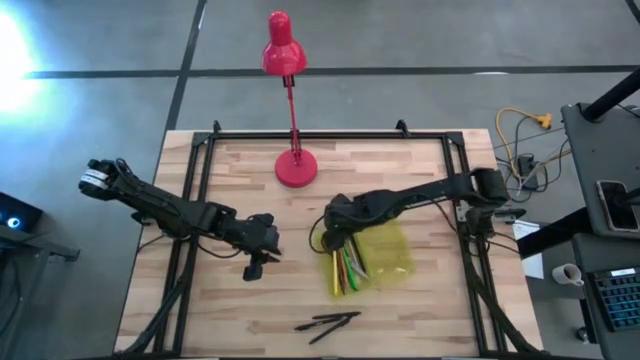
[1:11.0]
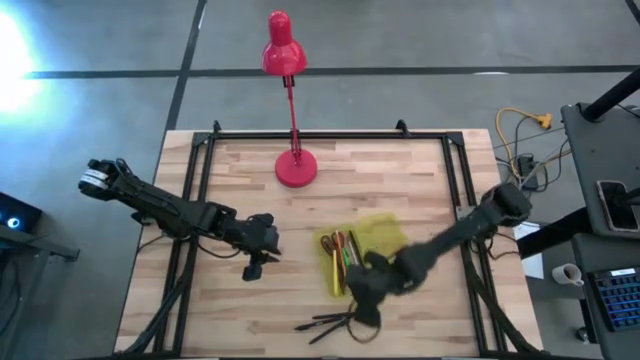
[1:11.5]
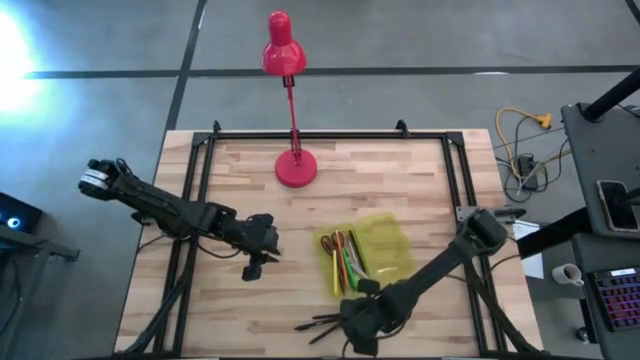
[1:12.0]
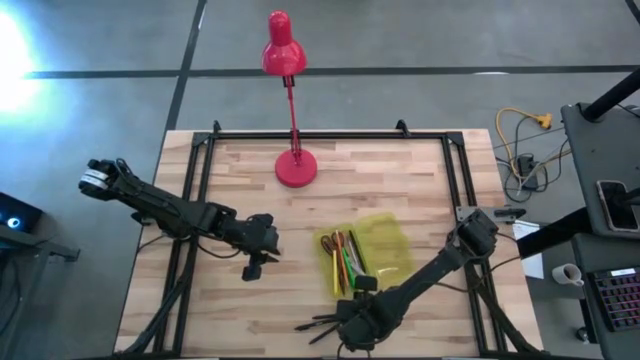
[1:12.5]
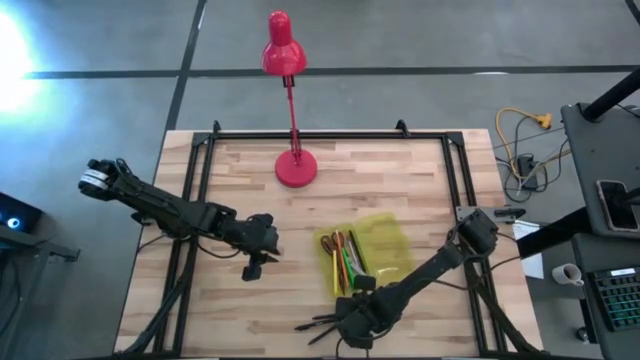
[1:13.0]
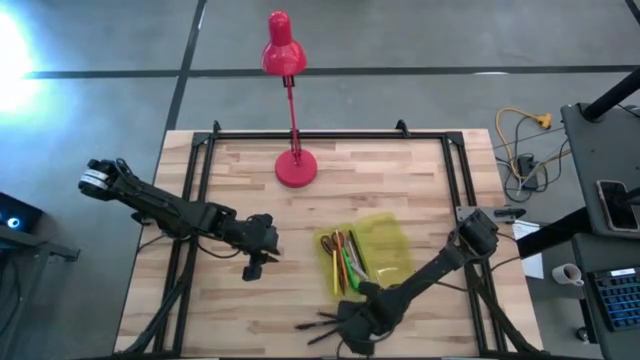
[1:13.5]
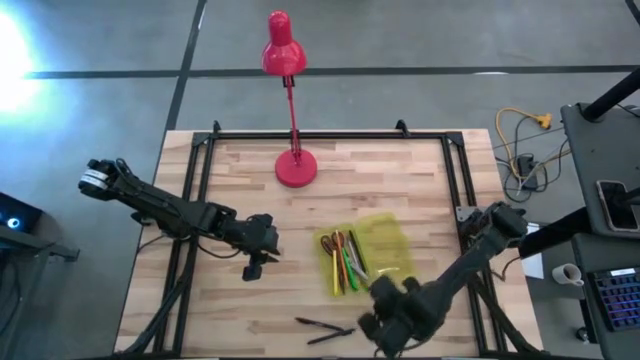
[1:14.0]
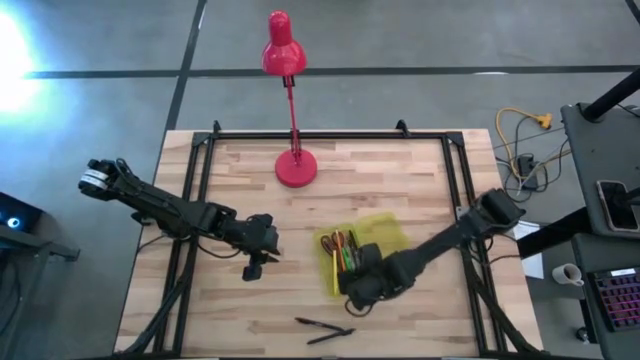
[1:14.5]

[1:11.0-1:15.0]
Task: Pick & place school supplies into a supply box
Put the black pen into the yellow supply box

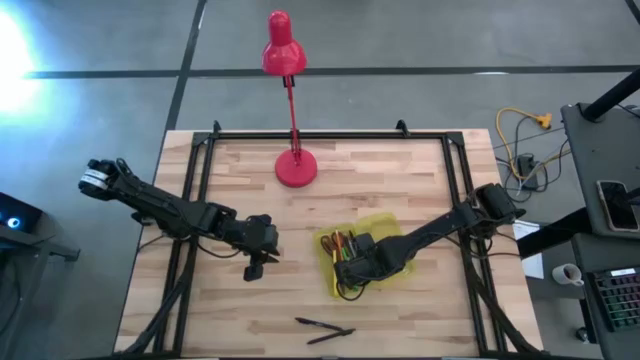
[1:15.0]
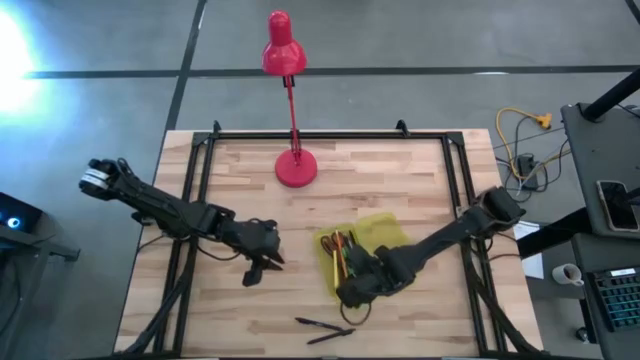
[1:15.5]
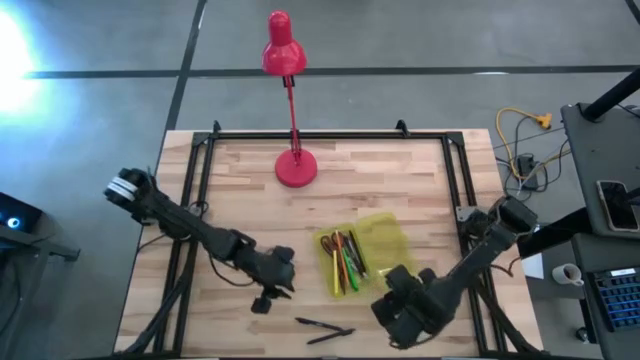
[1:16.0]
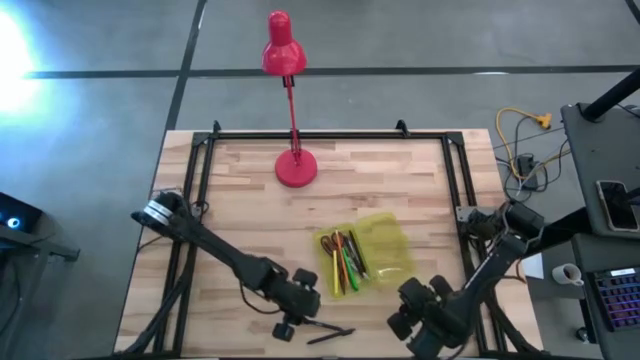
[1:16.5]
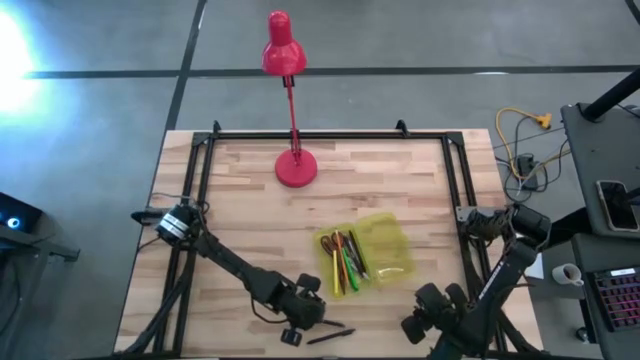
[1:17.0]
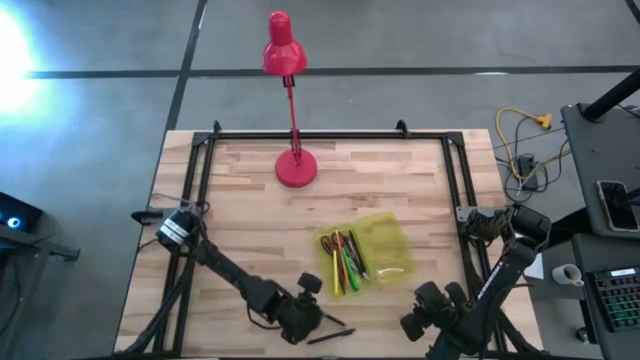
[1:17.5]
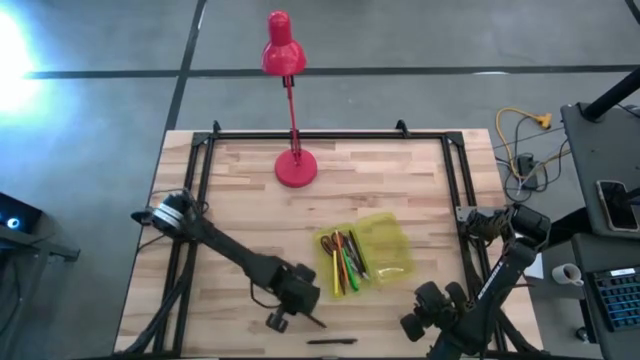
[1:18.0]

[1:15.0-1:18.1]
Put the black pen into the yellow supply box

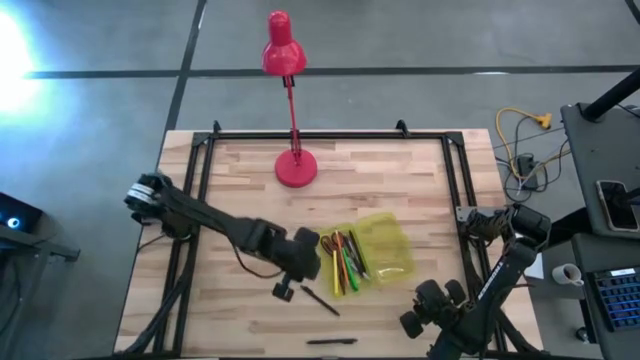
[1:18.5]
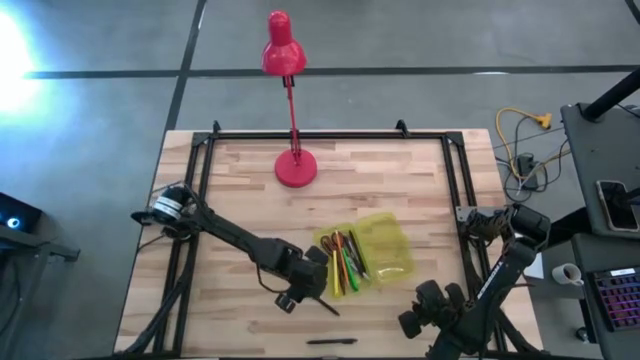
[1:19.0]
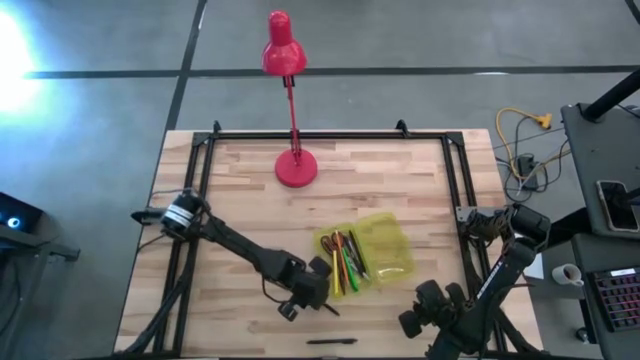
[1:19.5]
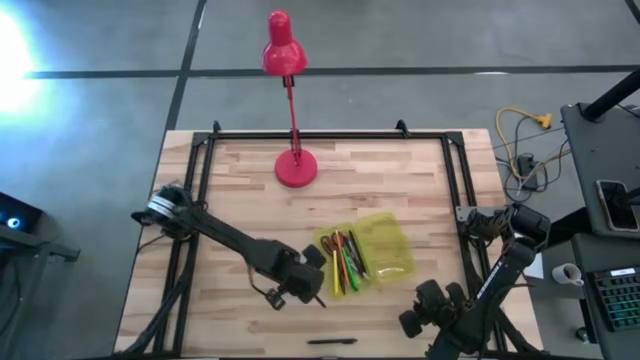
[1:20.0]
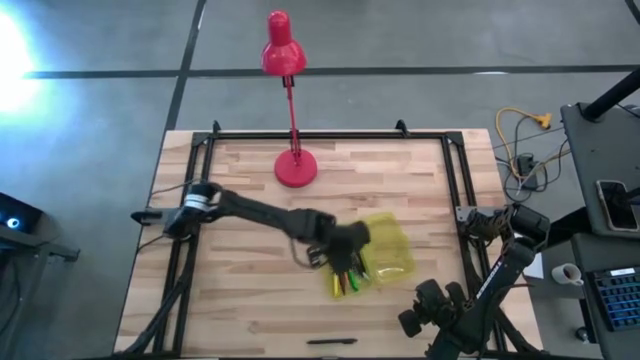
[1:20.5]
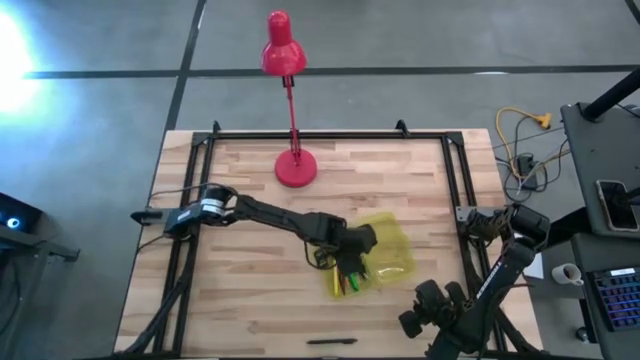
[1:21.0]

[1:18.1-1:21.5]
Put the black pen into the yellow supply box

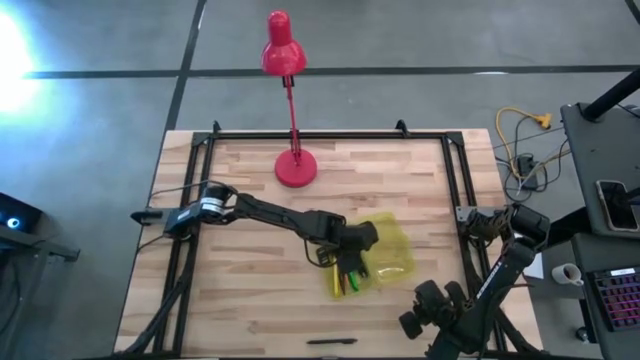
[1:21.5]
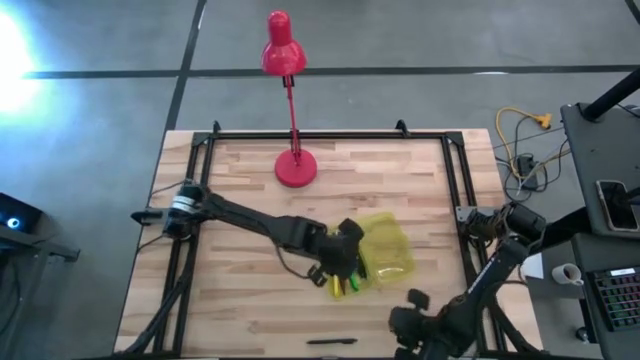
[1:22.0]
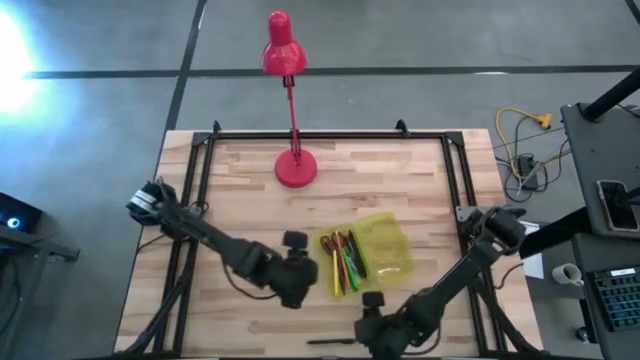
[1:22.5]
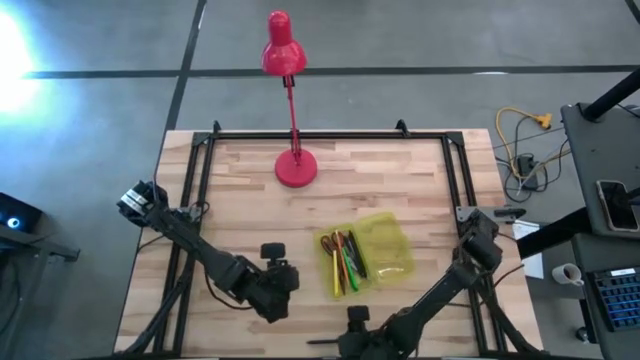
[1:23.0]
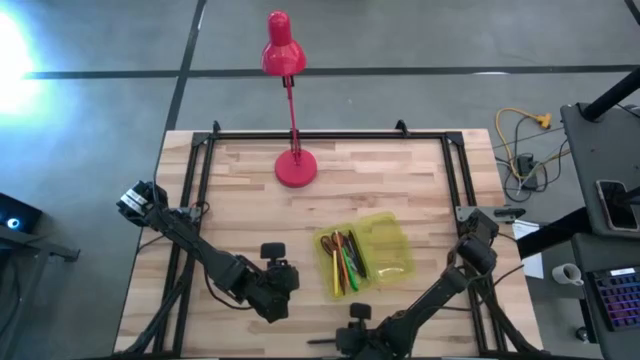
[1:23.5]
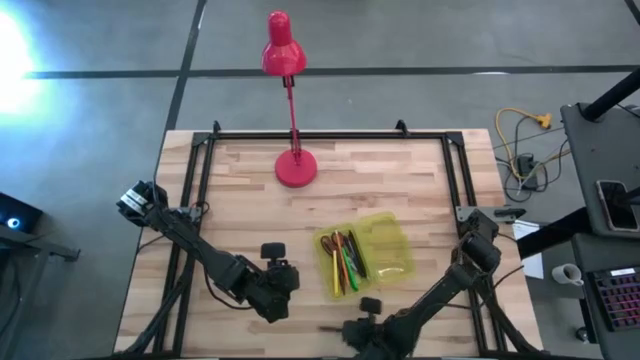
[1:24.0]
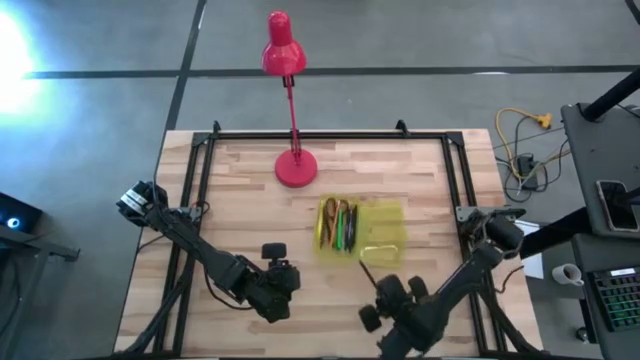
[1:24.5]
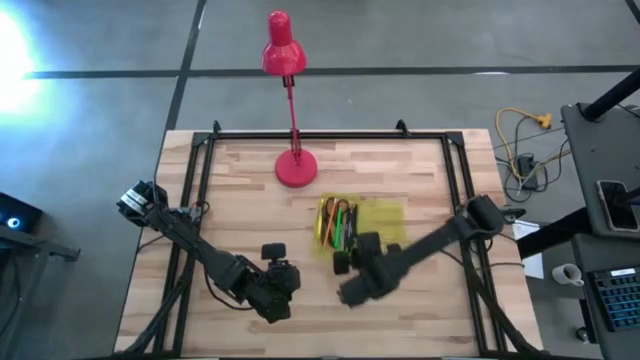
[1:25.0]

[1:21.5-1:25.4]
Put the black pen into the yellow supply box

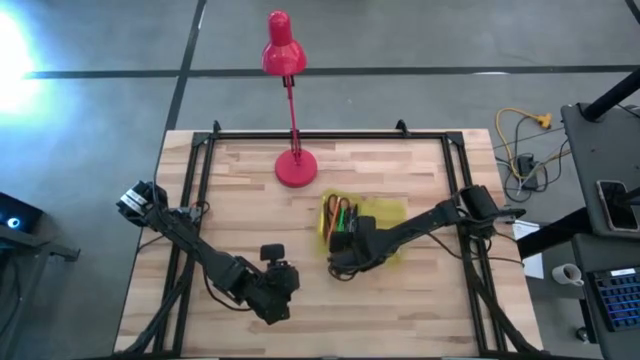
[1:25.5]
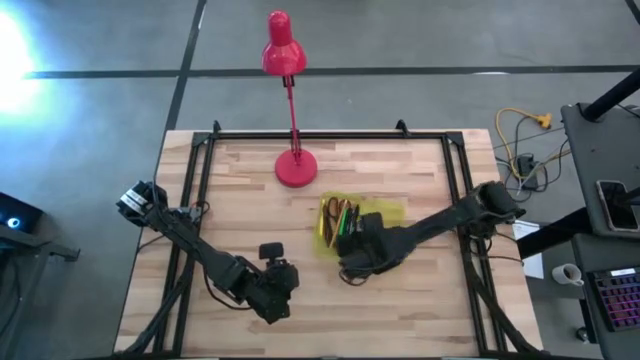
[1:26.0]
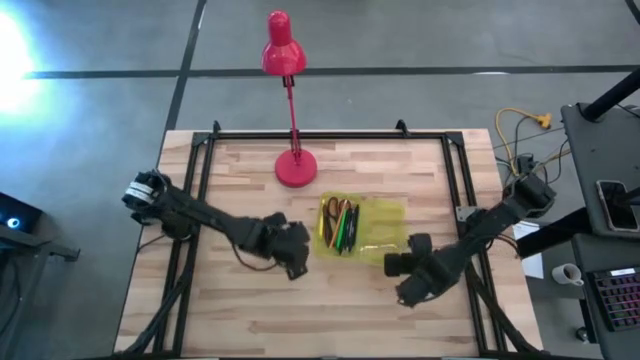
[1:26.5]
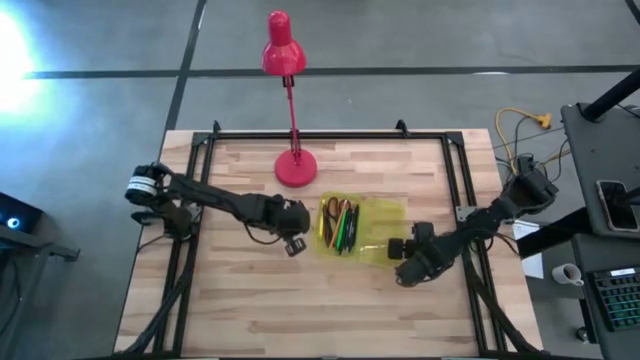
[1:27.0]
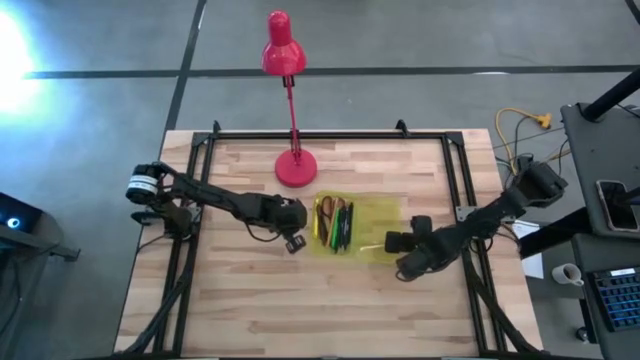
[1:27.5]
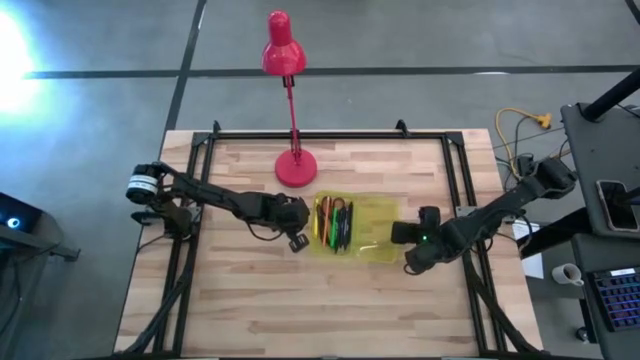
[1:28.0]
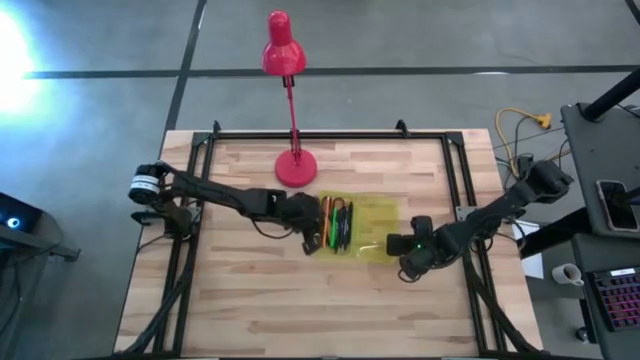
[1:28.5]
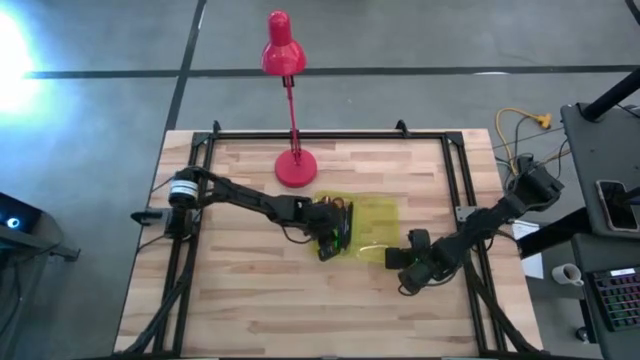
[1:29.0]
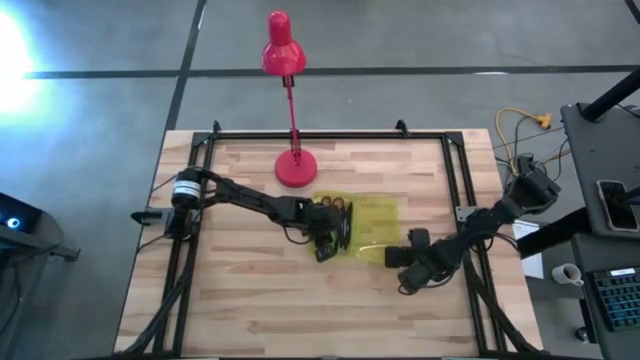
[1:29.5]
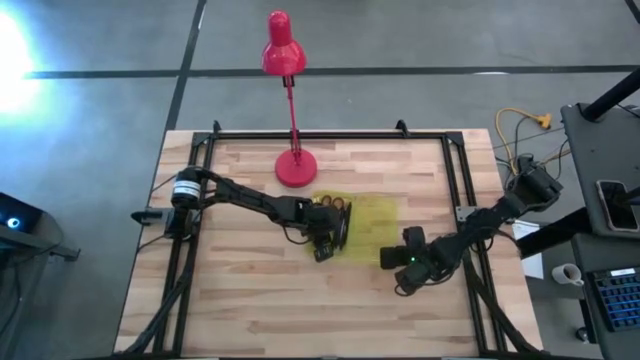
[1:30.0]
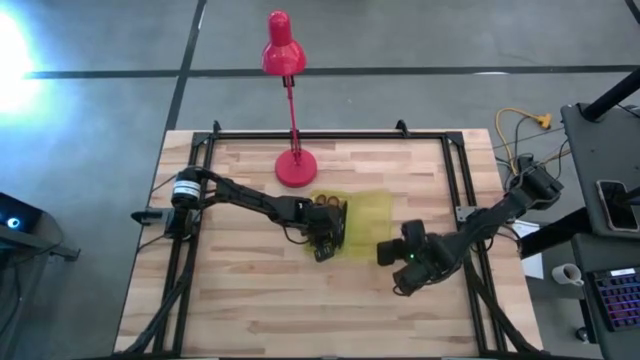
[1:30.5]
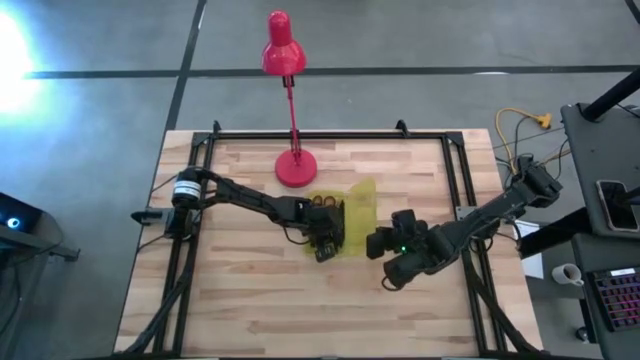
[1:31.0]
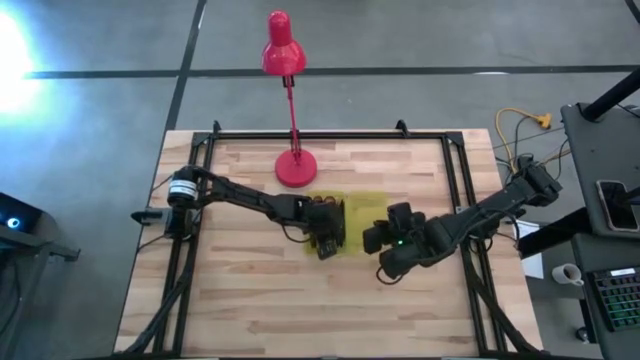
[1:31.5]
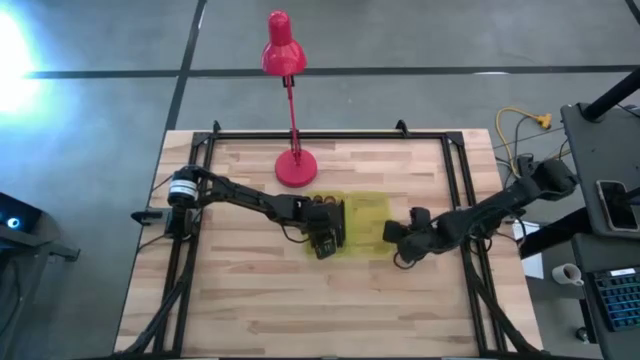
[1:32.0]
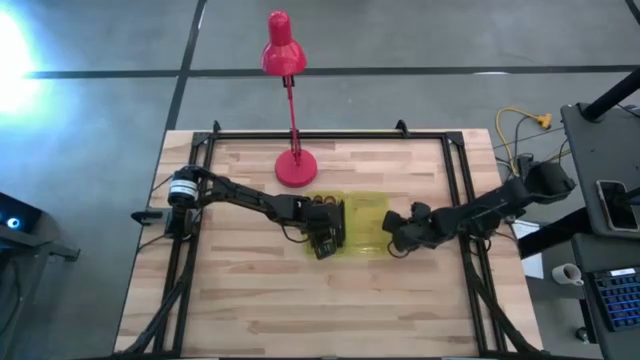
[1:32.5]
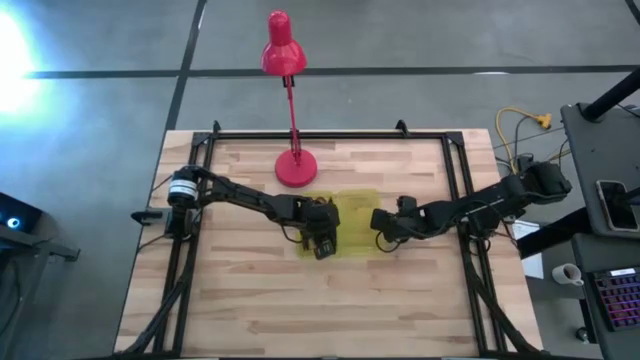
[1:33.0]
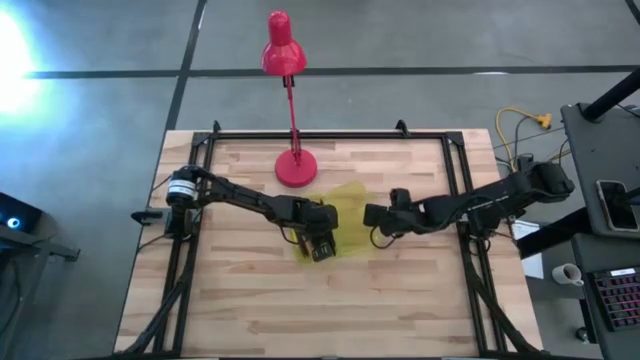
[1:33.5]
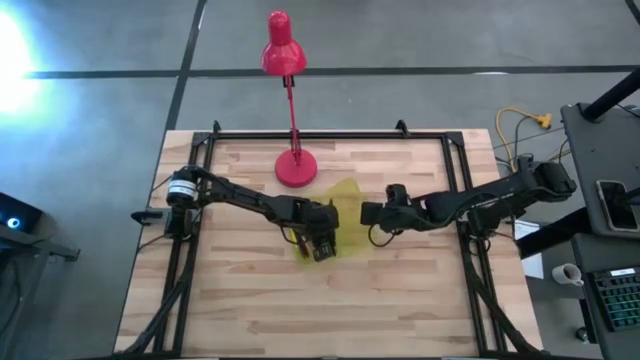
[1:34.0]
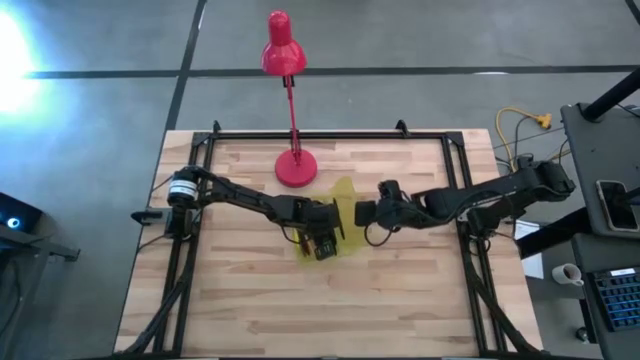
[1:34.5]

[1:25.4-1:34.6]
Close the yellow supply box
